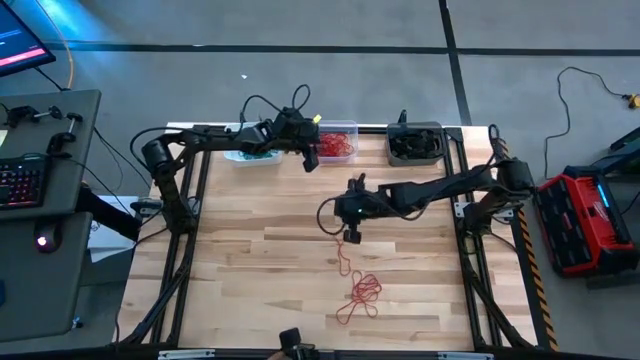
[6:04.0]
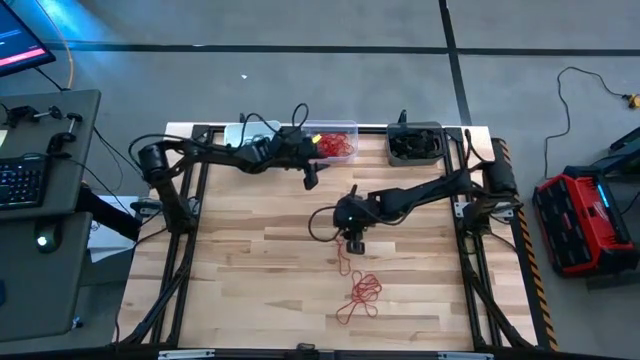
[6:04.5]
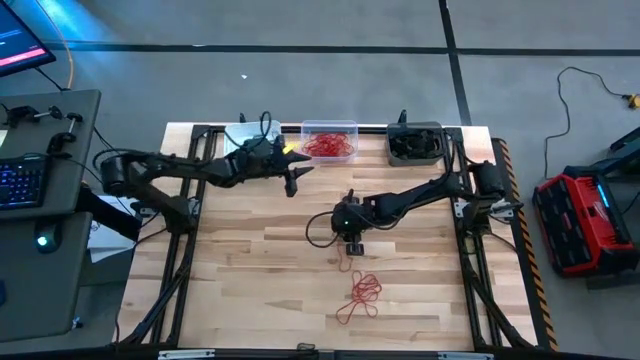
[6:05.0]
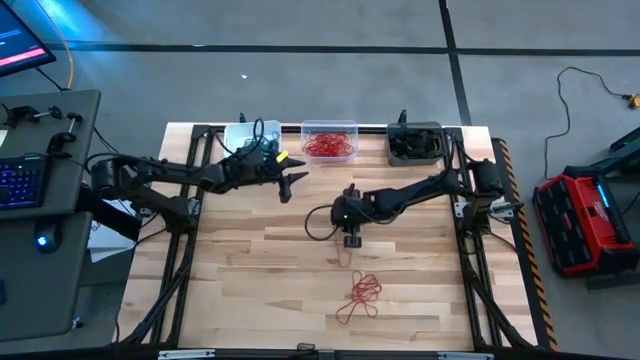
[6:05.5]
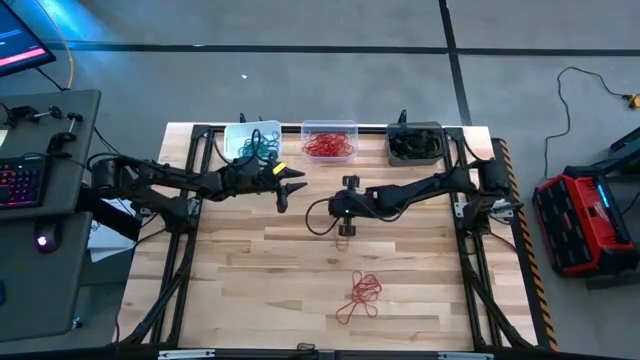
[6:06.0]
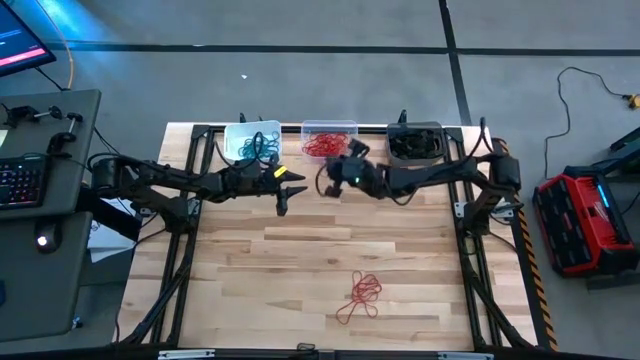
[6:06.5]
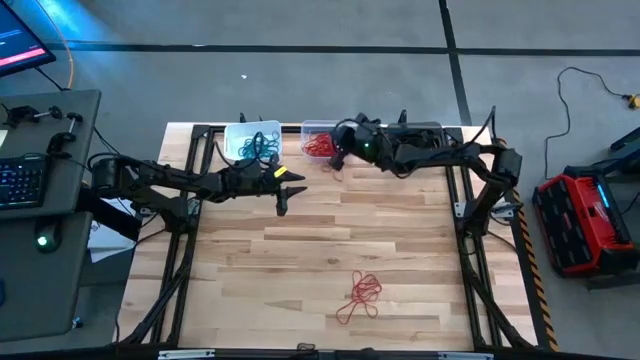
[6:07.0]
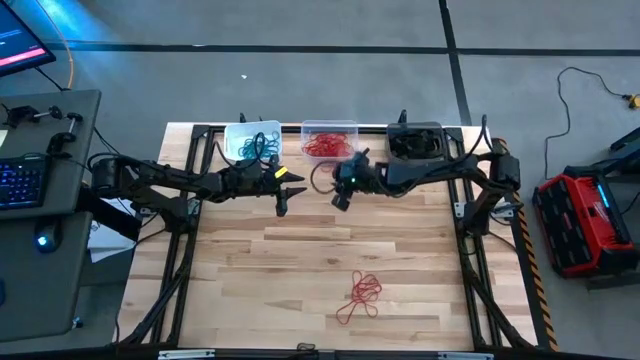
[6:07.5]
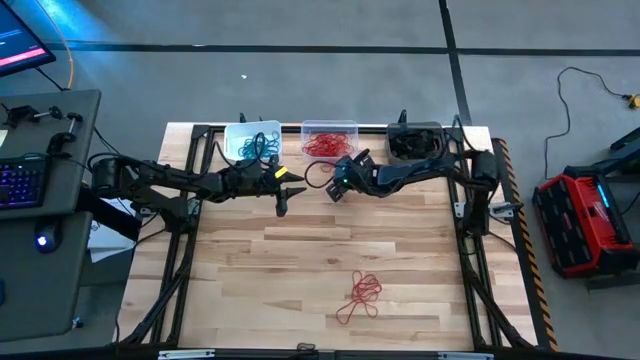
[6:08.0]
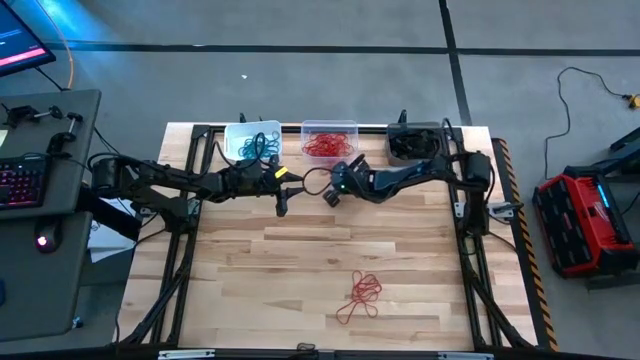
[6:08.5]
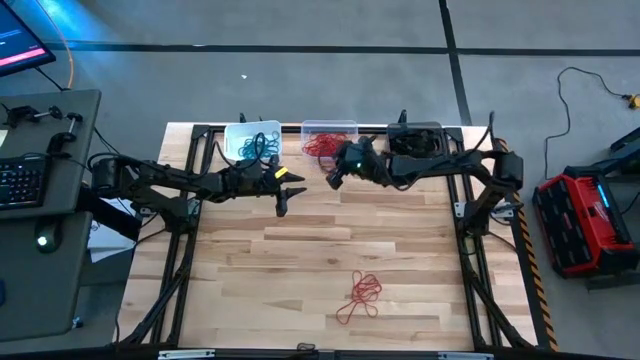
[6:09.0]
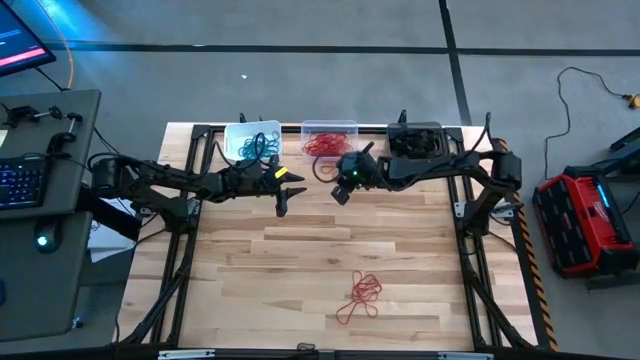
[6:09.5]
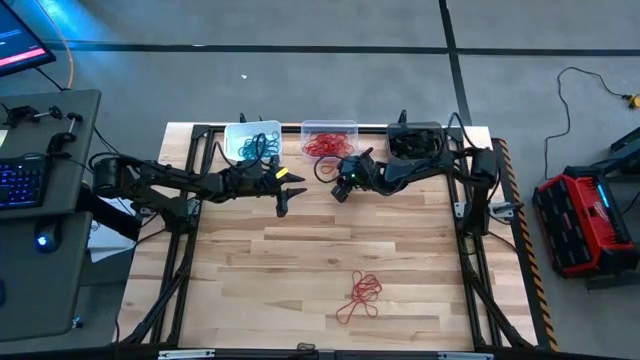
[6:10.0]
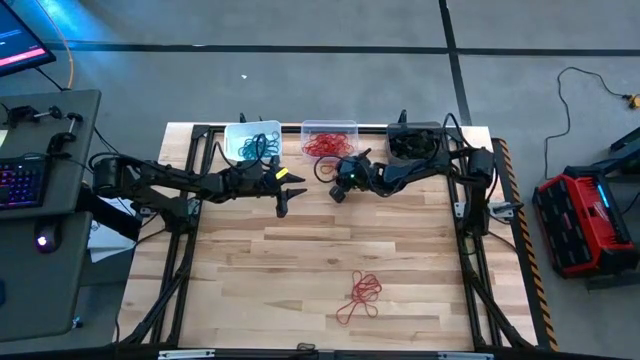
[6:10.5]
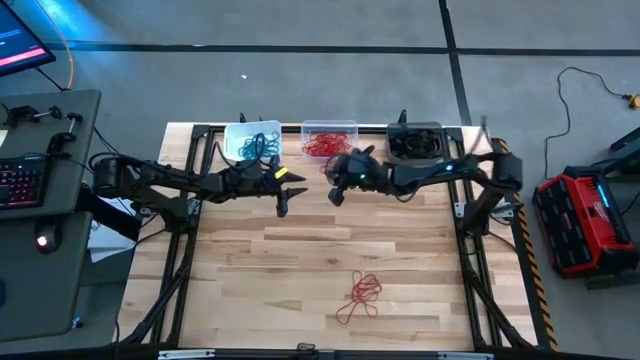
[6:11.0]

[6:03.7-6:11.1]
Task: Sort rubber bands into baskets
Put the red rubber band into the transparent bin

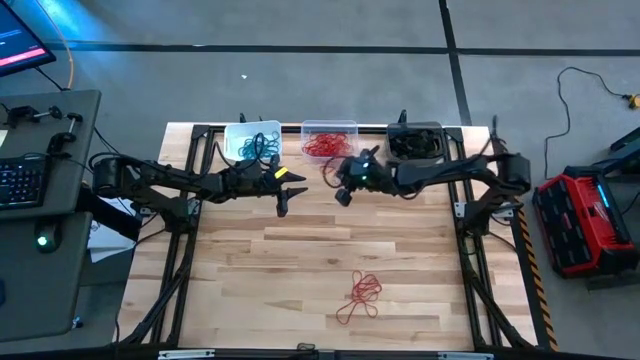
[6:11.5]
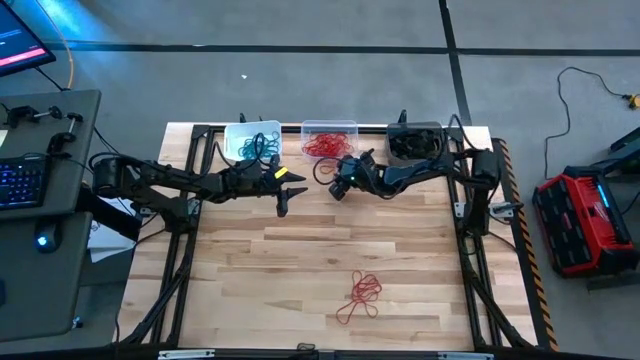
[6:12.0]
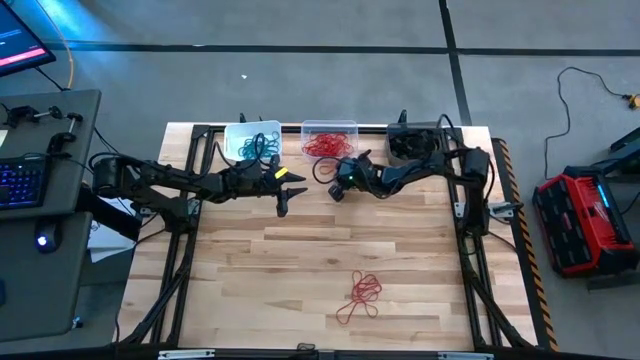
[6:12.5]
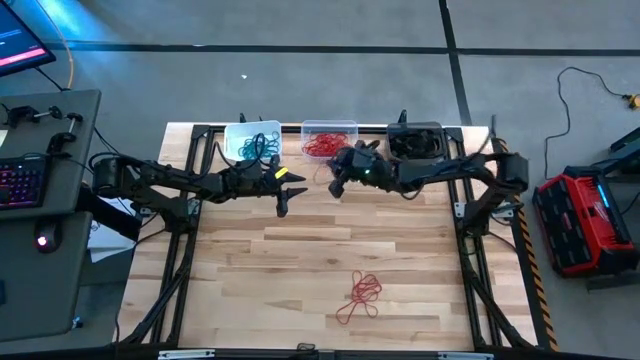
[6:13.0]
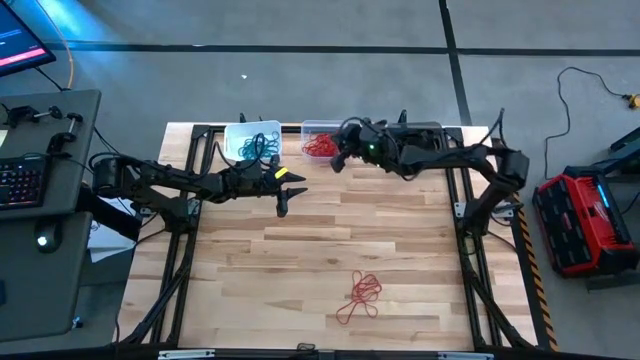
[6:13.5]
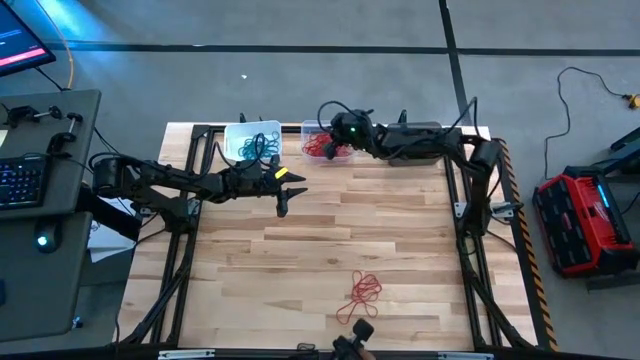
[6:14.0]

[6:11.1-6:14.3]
Put the red rubber band into the transparent bin

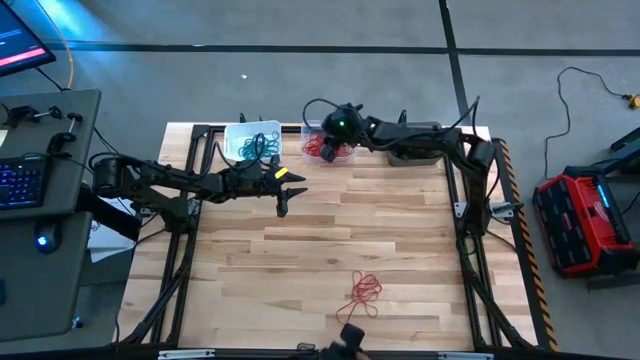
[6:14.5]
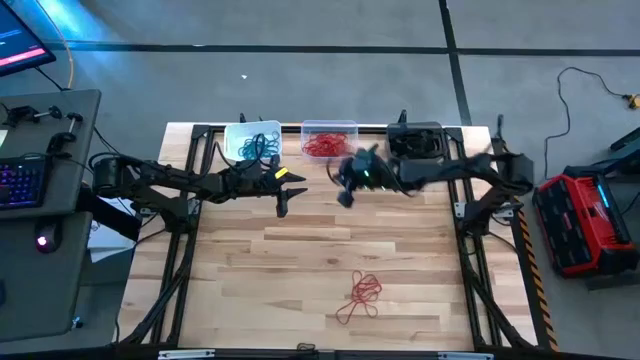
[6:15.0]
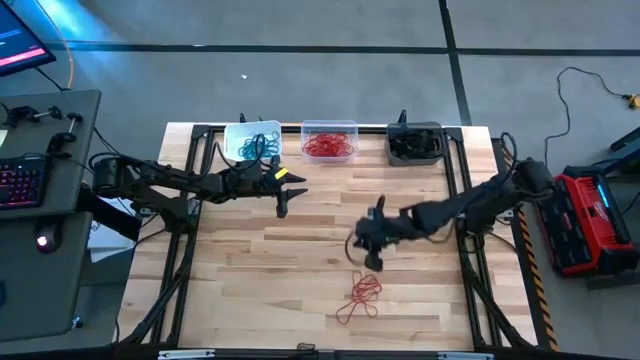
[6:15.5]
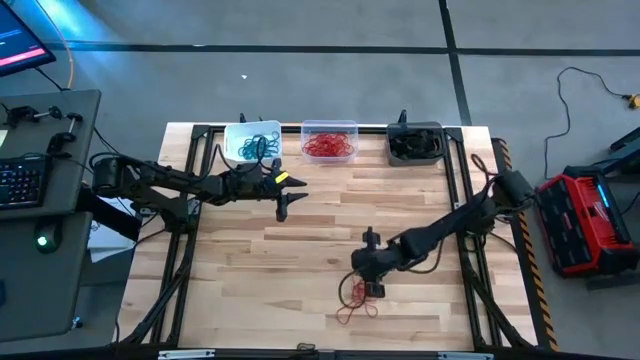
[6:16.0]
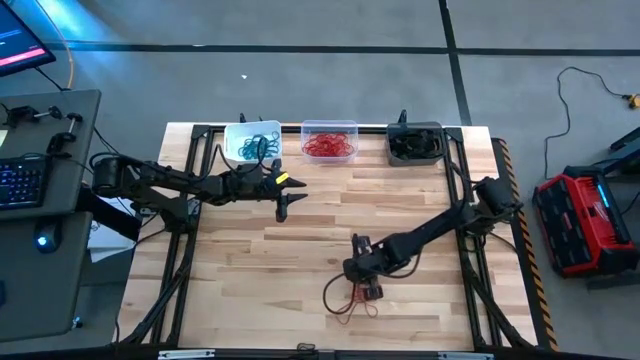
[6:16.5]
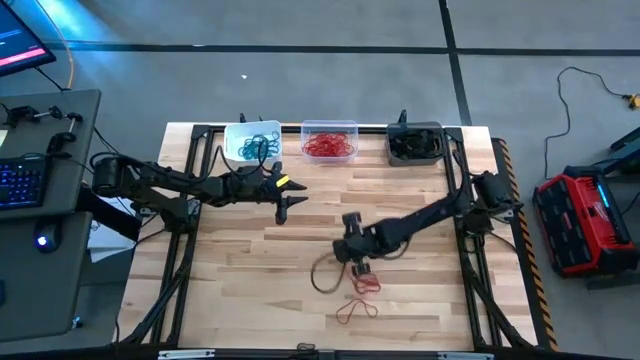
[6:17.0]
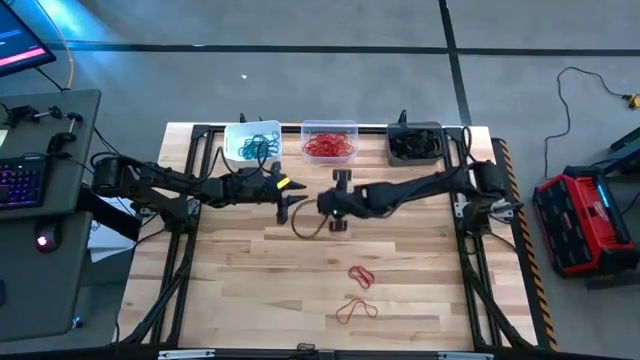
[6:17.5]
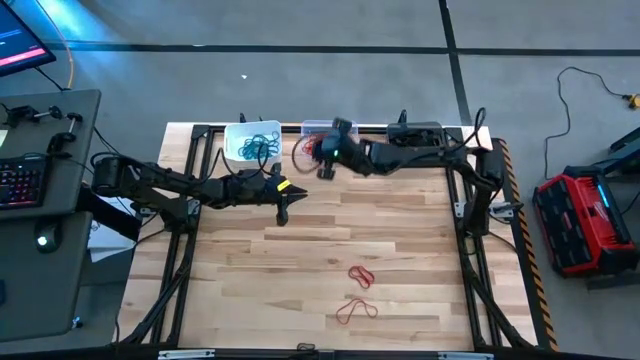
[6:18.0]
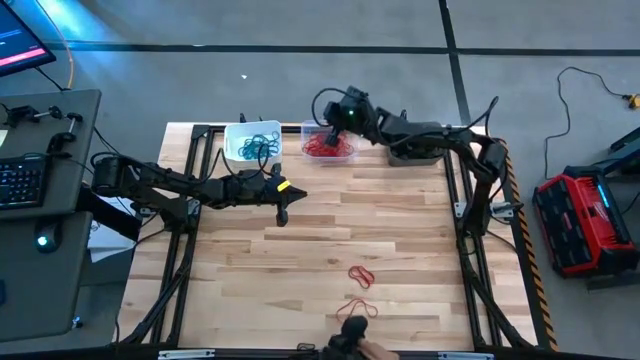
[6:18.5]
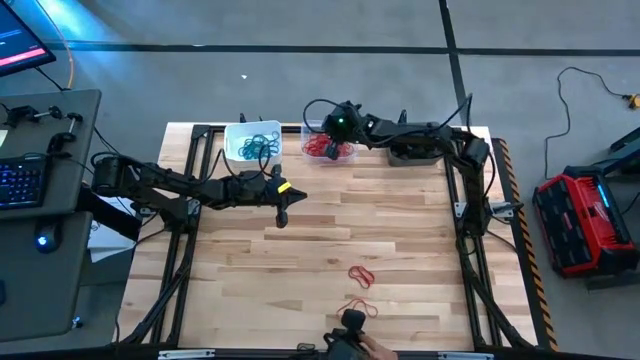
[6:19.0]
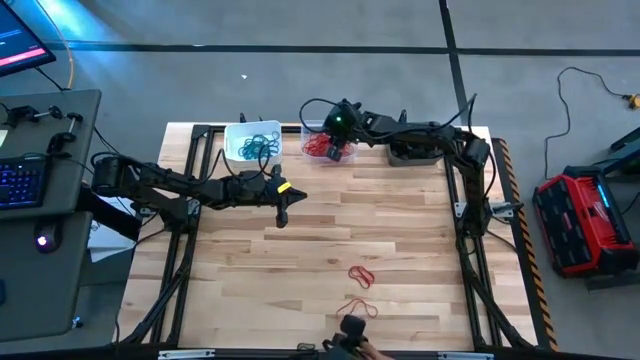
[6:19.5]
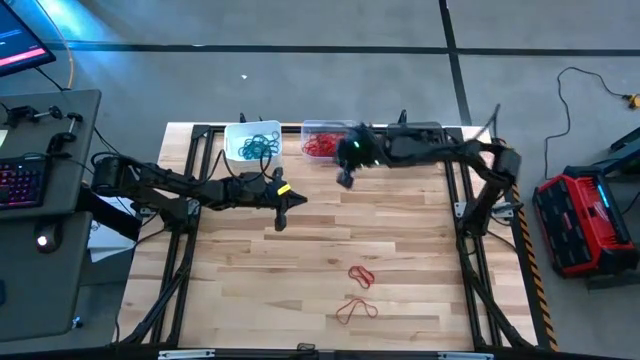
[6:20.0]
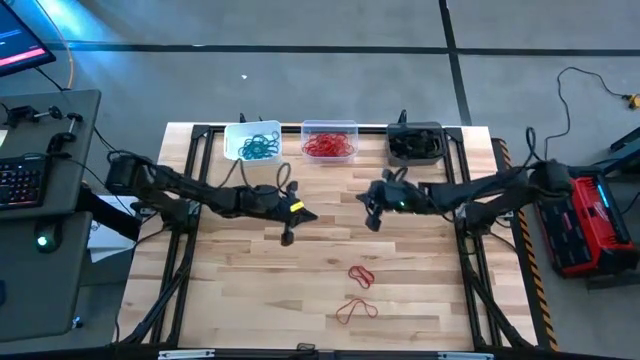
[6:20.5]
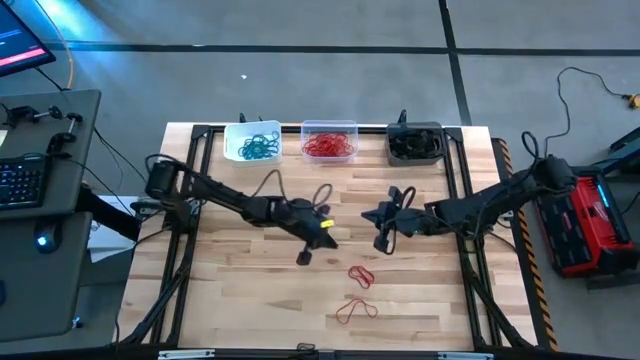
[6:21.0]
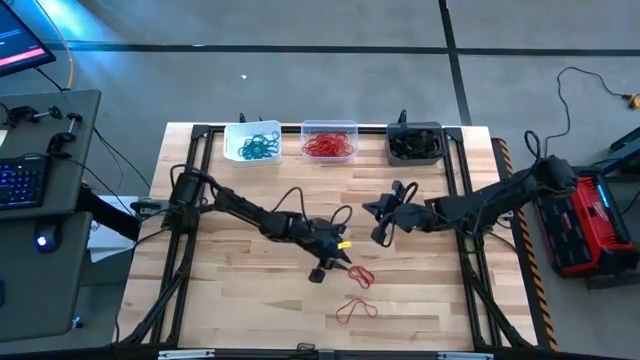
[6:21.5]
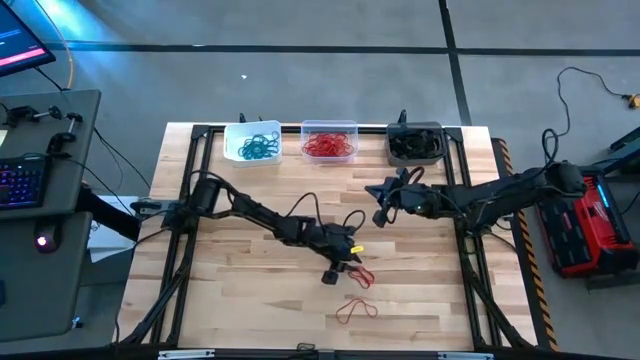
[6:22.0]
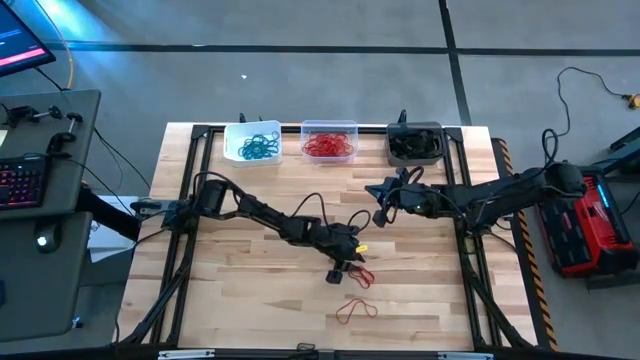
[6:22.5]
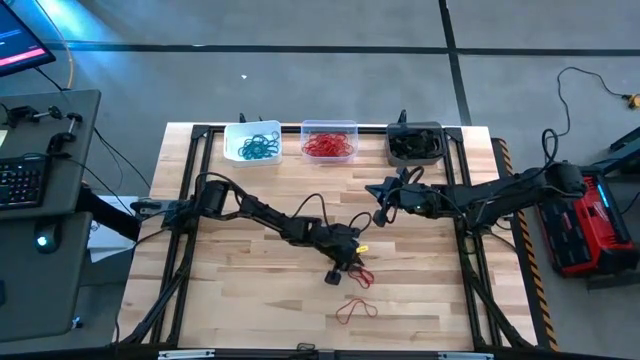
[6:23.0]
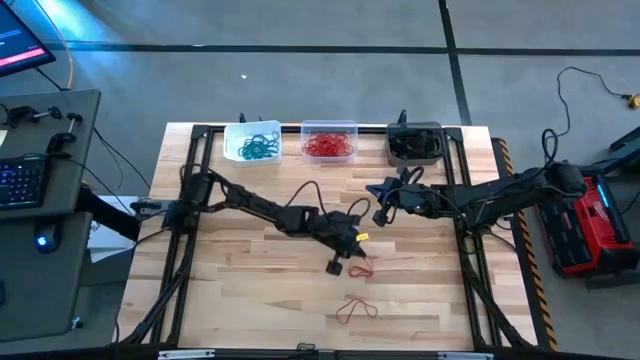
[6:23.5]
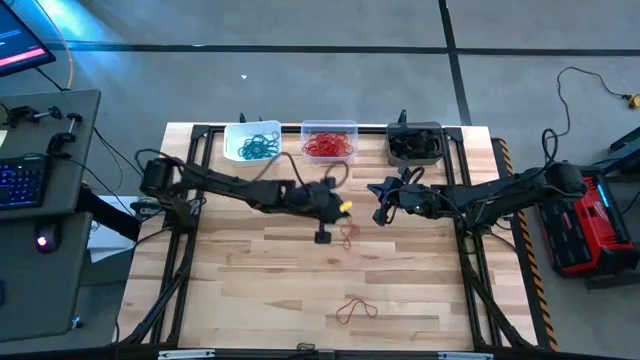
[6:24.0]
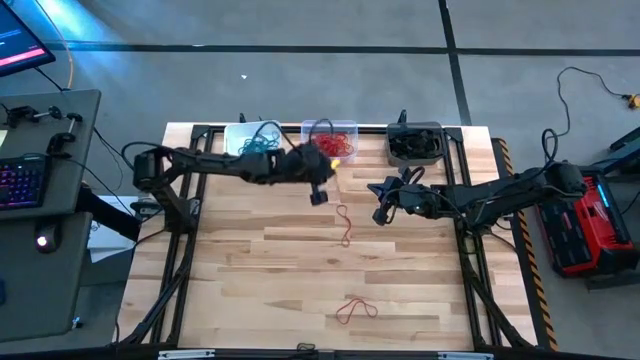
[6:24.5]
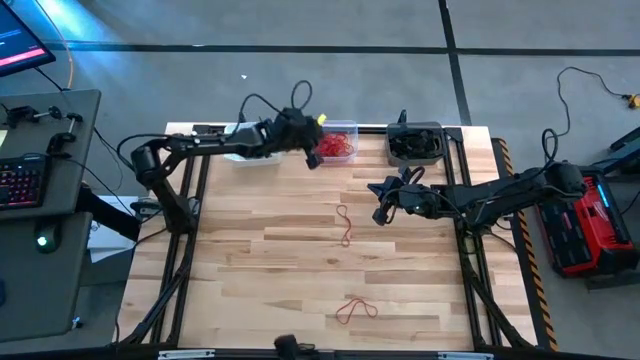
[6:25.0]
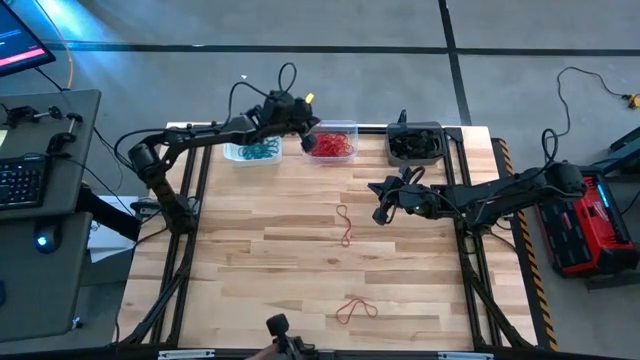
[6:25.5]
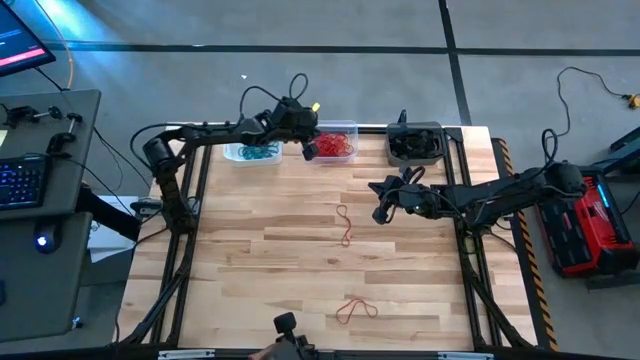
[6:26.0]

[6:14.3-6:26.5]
Put the red rubber band into the transparent bin
